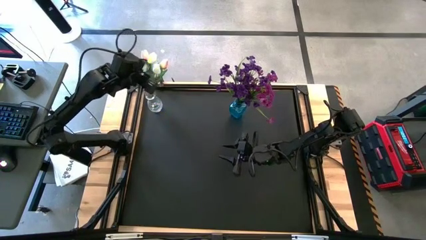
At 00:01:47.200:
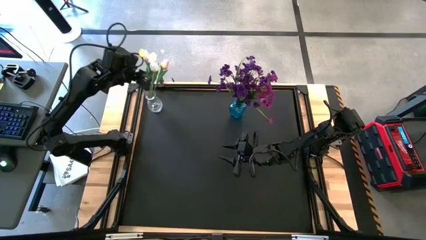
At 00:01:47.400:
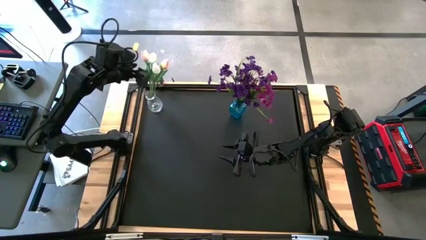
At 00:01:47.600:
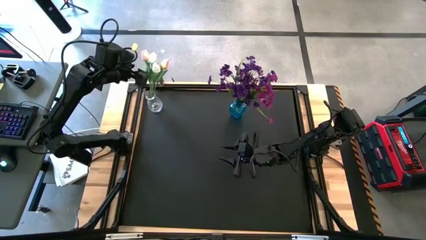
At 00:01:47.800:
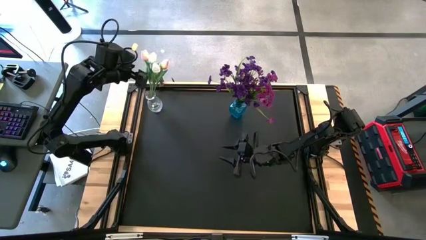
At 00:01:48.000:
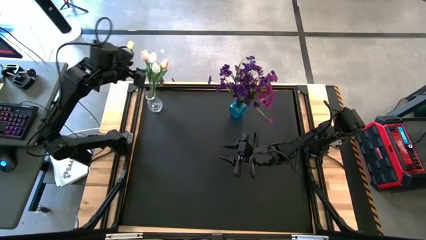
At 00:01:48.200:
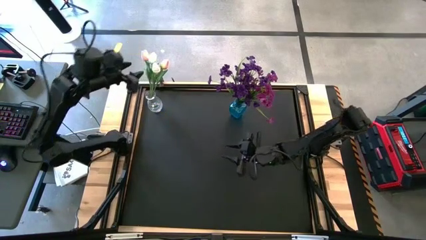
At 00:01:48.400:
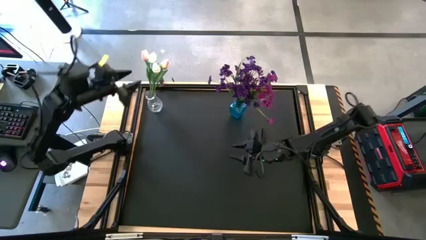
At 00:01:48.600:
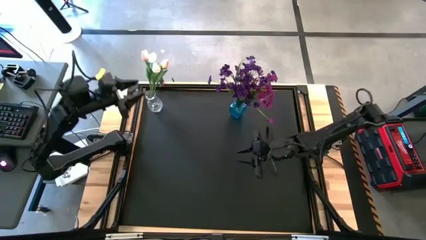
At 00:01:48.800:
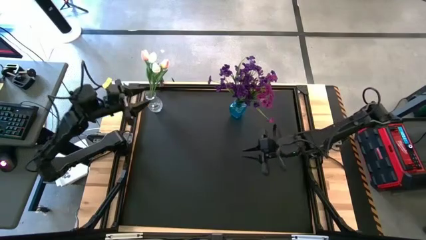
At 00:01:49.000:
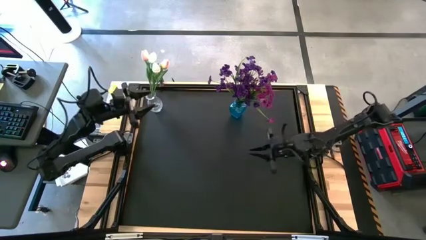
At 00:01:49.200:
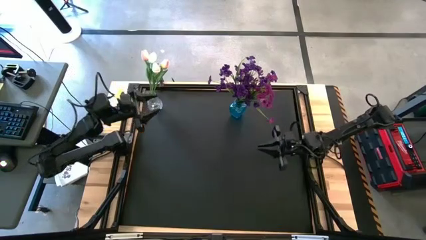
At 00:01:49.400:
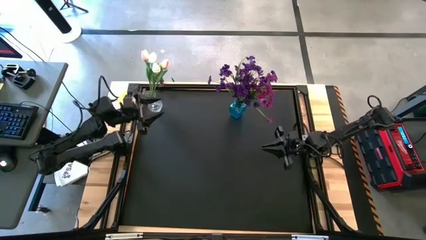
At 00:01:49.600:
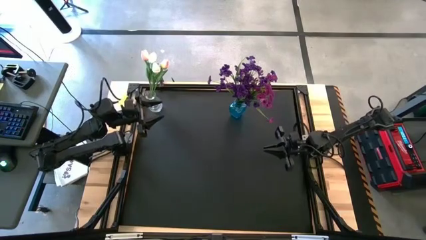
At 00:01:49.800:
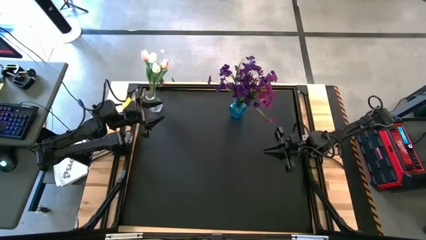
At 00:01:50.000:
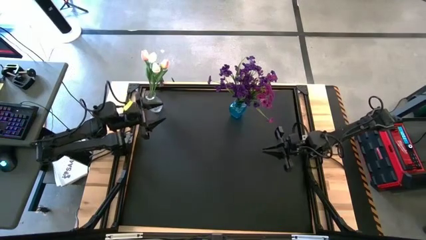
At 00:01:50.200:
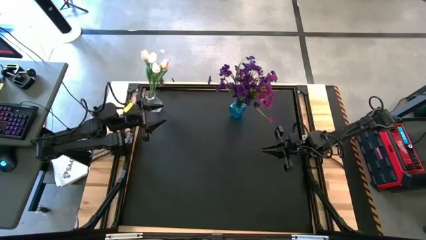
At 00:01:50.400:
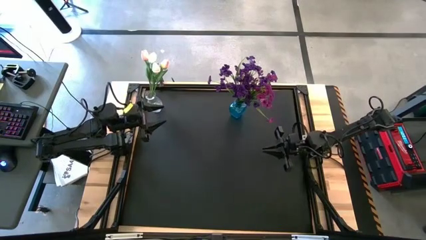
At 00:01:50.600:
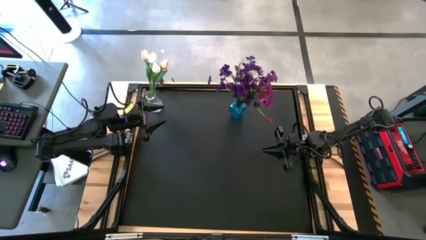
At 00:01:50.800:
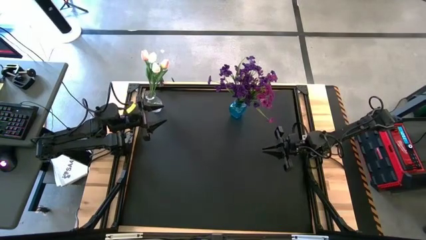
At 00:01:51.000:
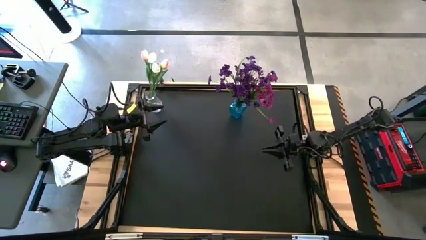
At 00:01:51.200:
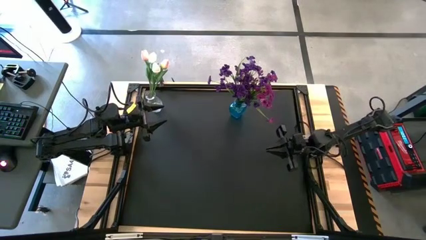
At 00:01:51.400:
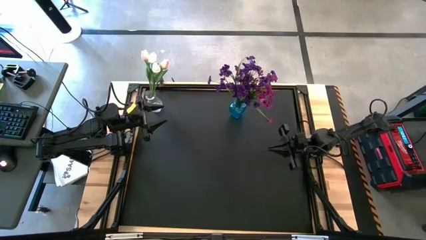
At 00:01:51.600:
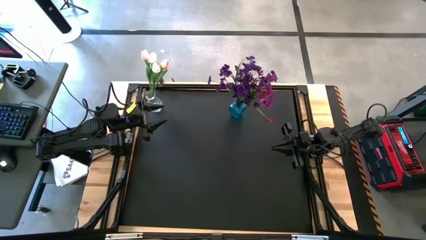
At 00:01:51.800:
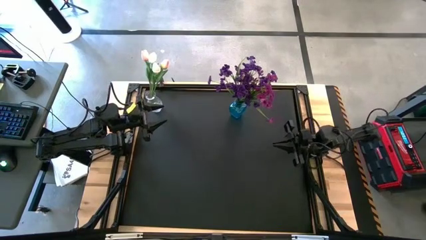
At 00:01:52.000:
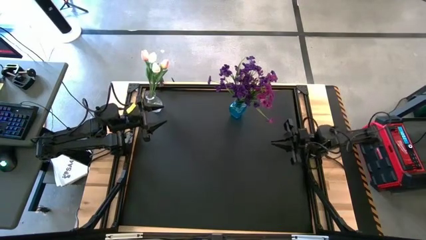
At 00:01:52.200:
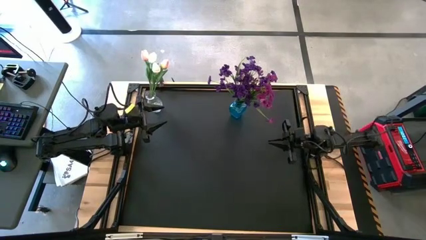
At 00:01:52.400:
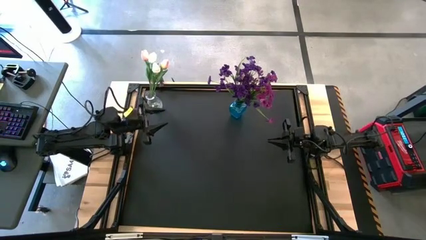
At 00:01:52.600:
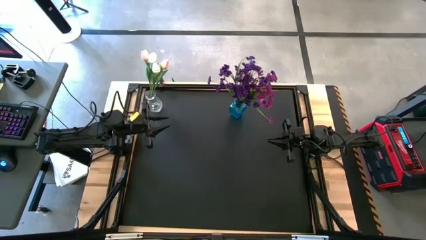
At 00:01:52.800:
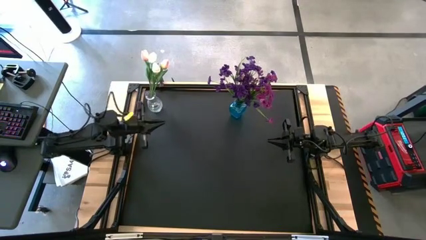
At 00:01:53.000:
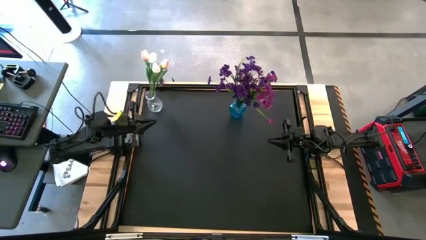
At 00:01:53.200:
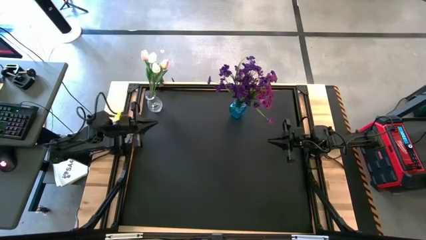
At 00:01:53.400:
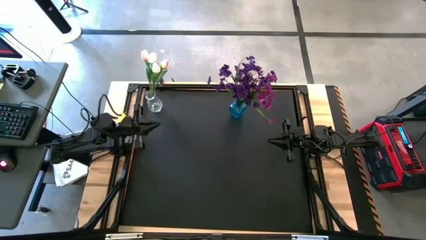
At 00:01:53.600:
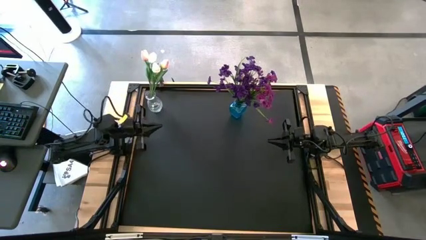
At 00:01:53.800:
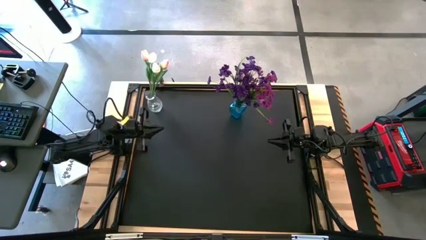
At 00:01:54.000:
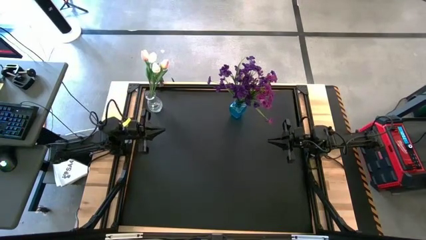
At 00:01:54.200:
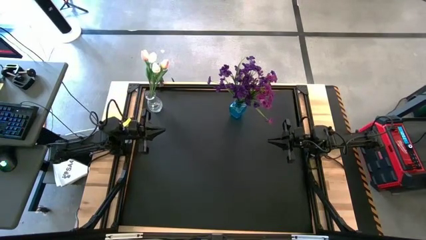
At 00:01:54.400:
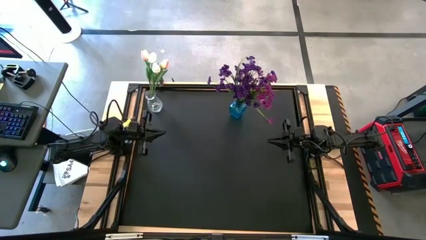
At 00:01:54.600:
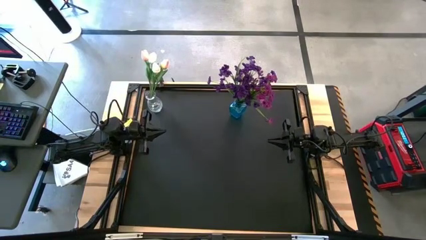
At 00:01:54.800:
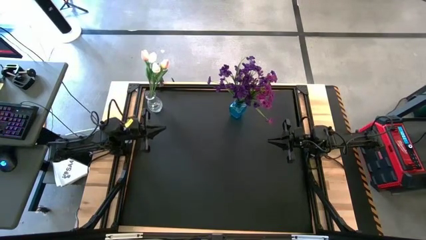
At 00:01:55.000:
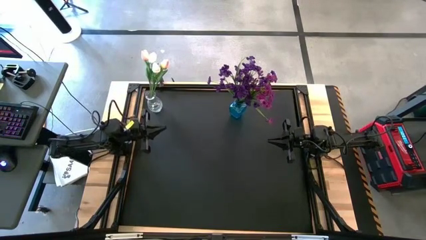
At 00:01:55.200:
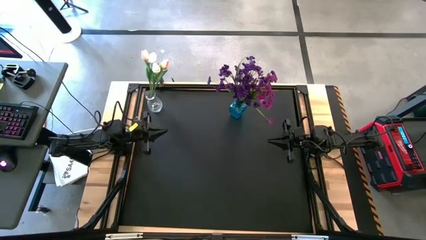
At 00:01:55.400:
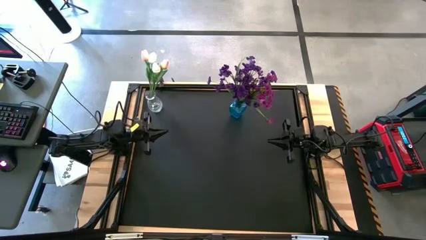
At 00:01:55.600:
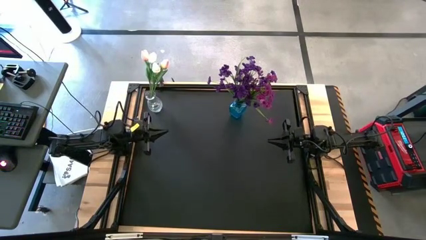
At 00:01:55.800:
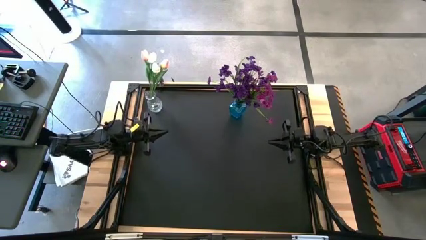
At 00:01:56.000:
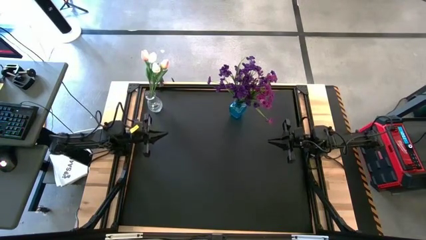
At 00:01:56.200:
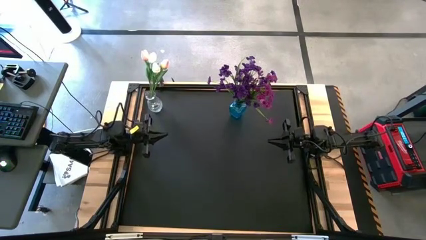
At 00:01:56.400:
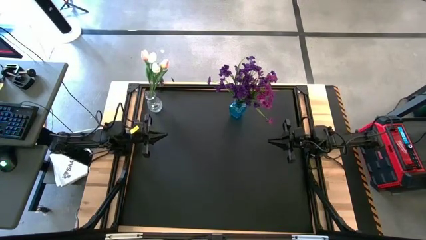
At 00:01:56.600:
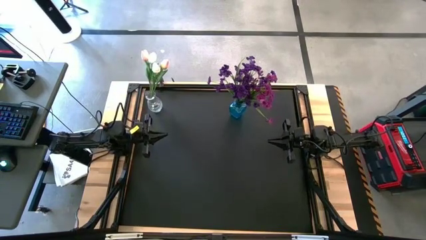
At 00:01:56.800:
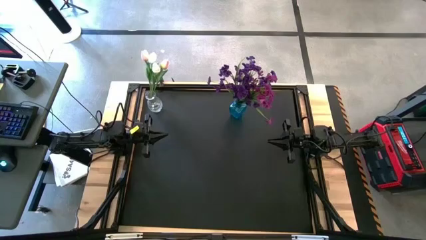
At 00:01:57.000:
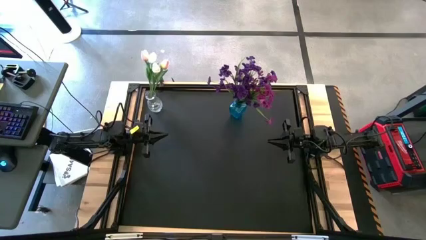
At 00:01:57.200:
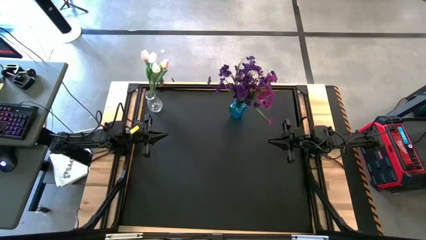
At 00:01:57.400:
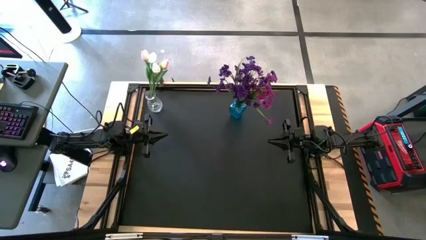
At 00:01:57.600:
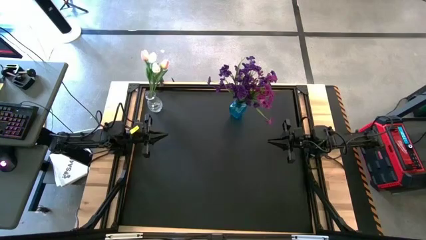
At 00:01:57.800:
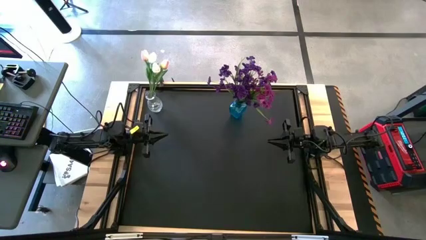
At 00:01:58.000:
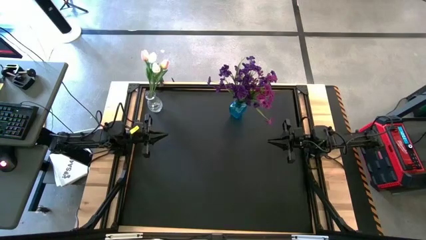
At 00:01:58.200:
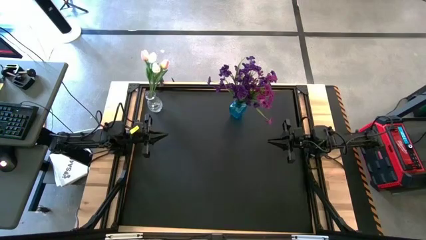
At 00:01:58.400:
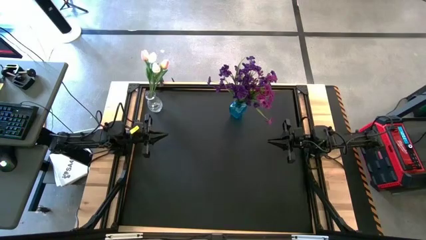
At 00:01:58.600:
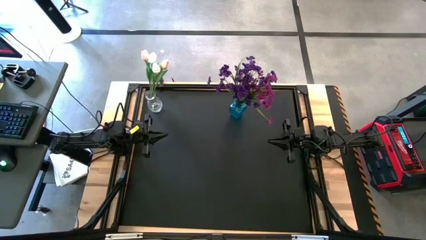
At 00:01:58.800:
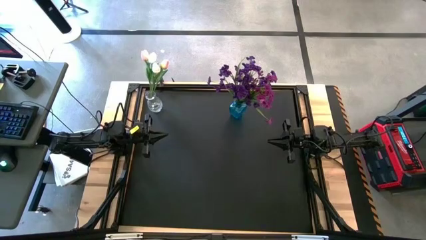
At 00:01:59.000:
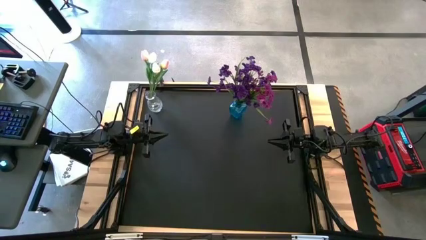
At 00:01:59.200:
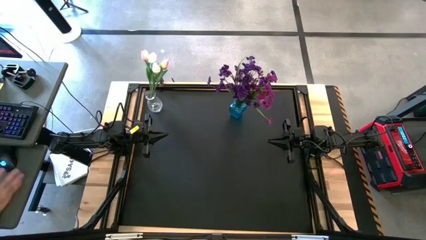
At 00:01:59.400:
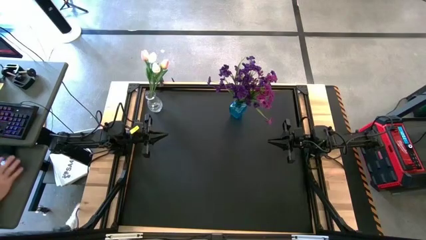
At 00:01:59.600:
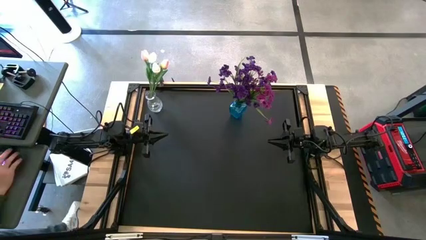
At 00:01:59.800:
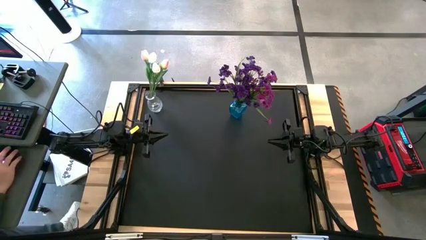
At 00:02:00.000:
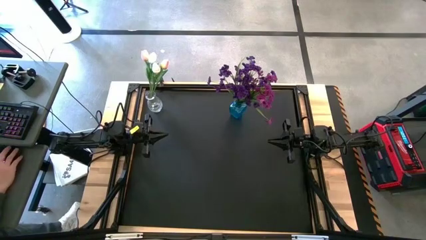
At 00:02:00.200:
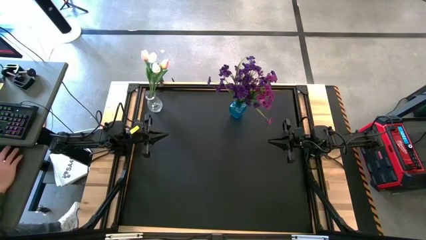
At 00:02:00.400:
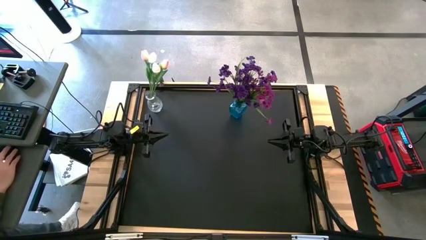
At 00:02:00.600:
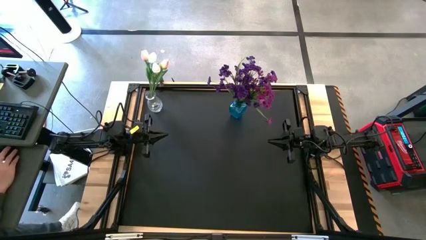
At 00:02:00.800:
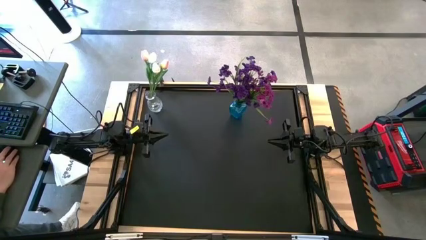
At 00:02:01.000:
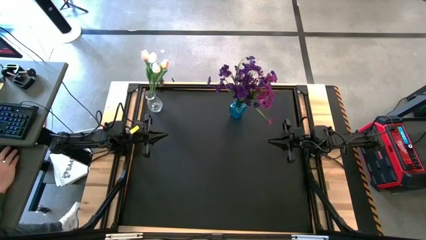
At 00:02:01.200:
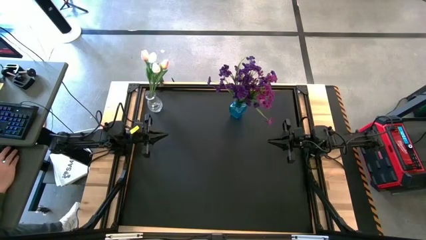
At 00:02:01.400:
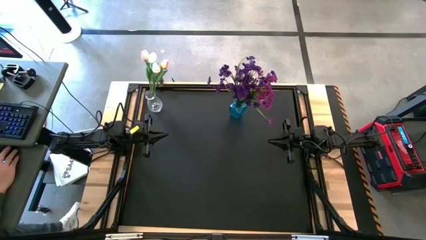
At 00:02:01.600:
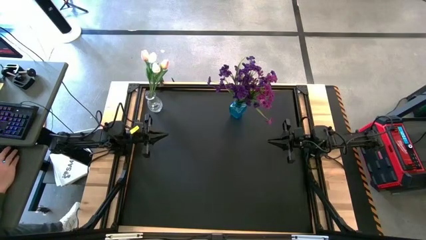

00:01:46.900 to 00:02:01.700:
Task: Sort flowers into vase by color
Return to Home Position
